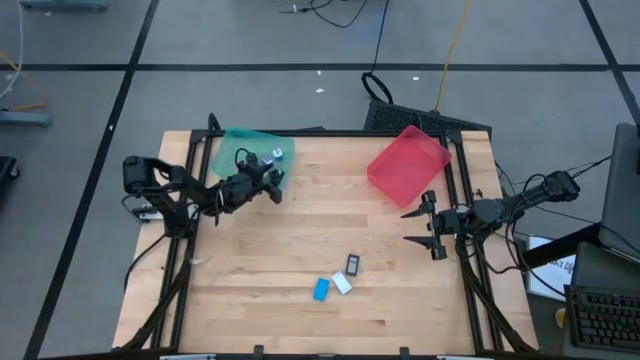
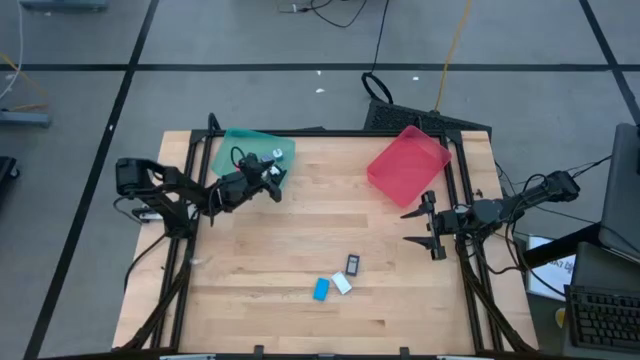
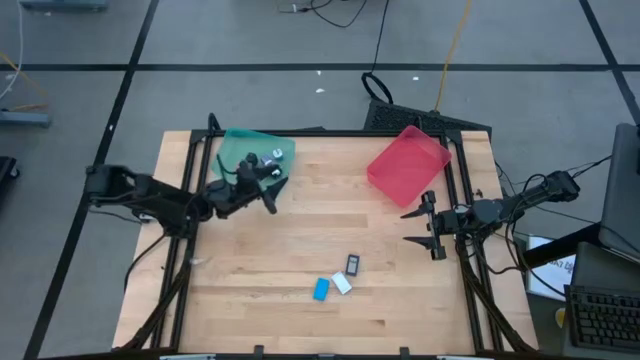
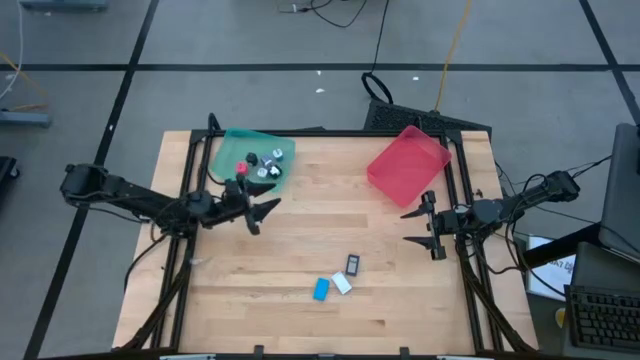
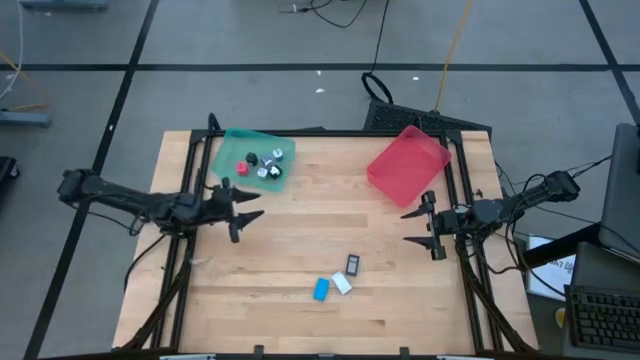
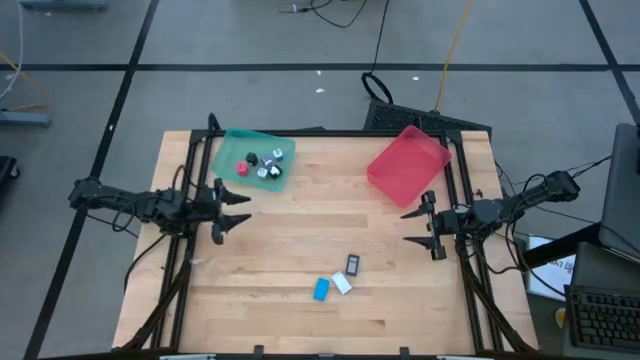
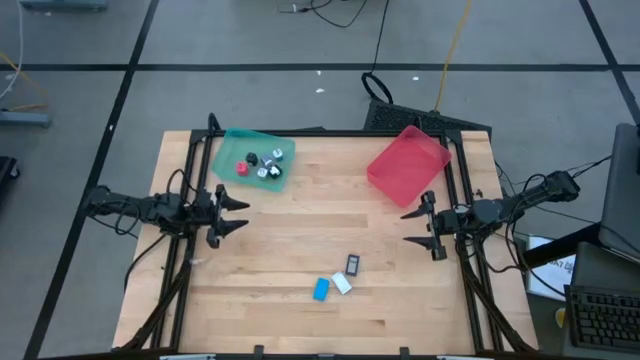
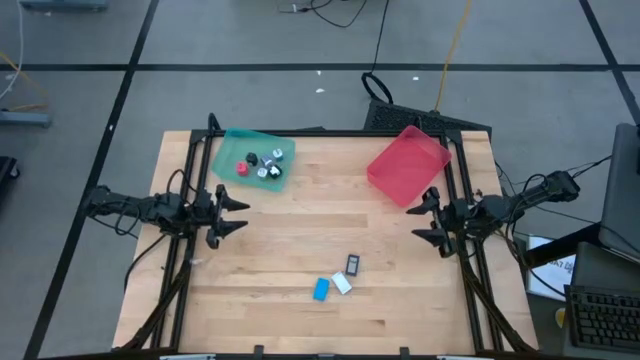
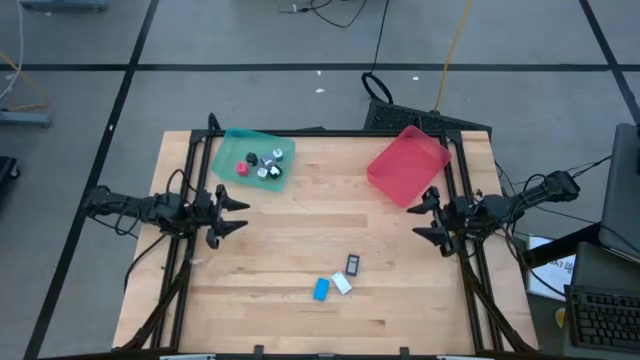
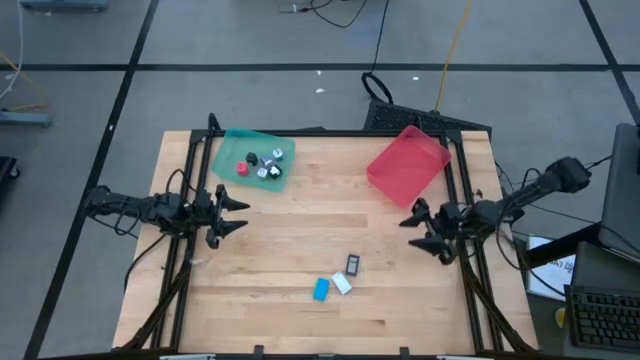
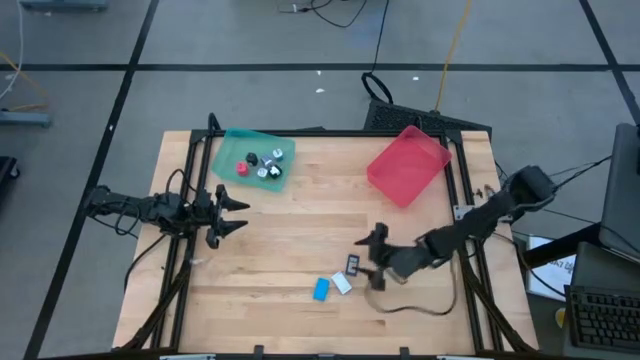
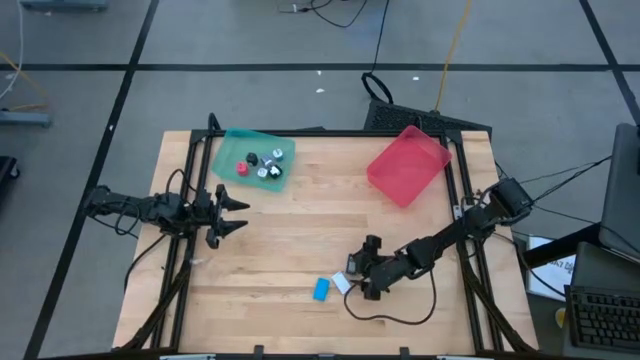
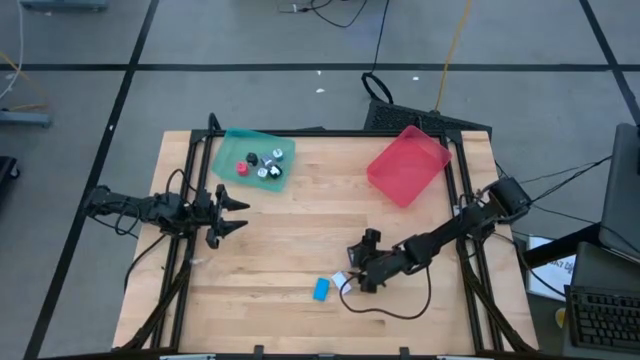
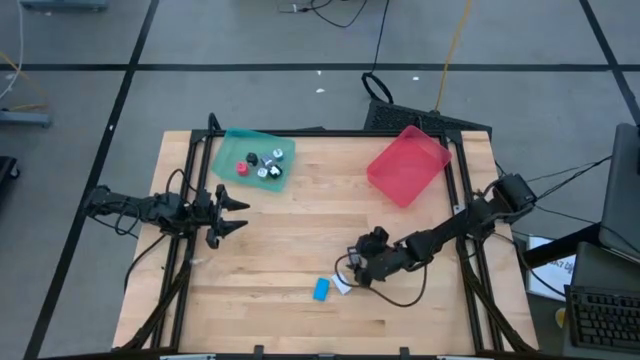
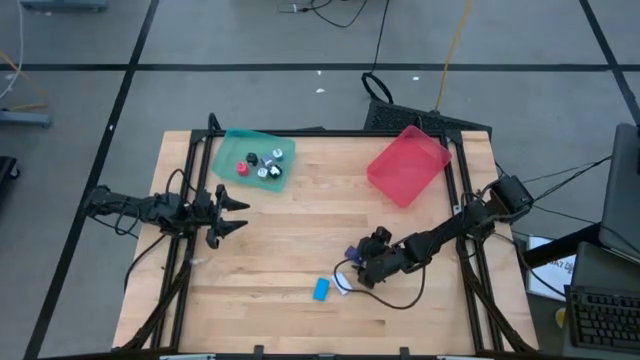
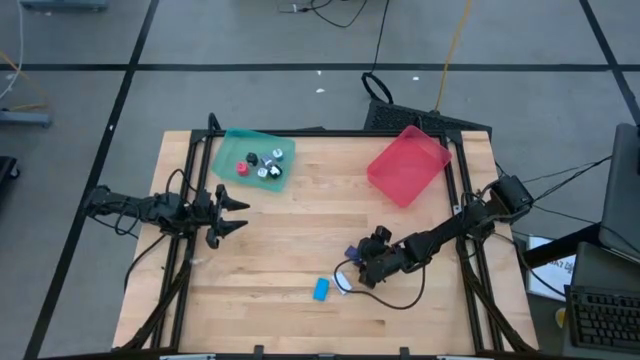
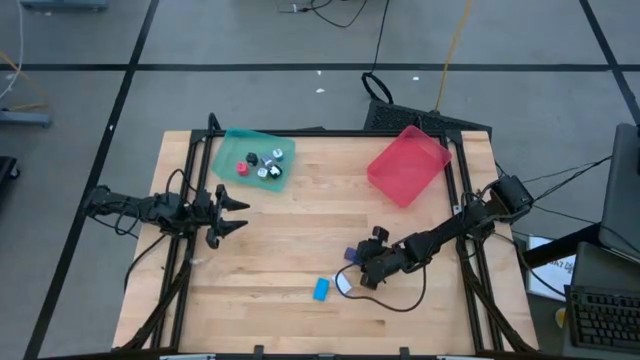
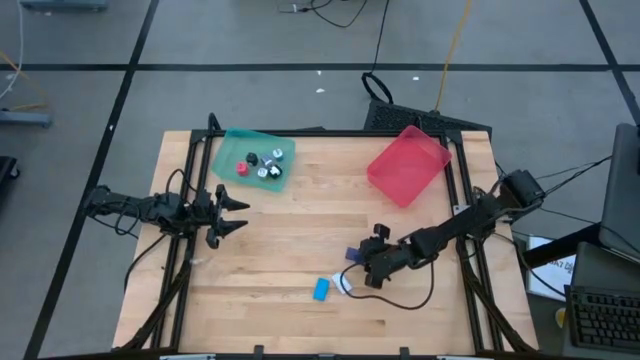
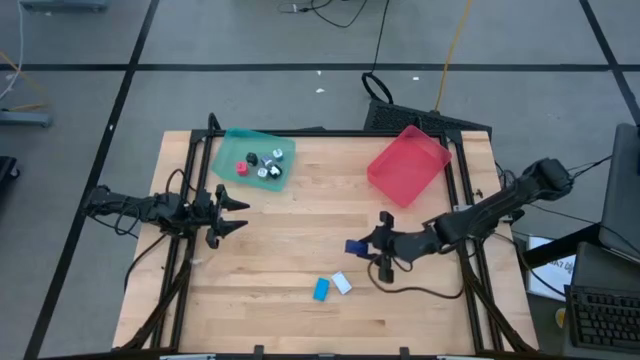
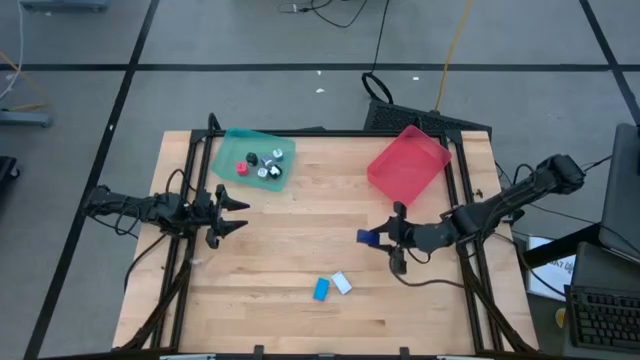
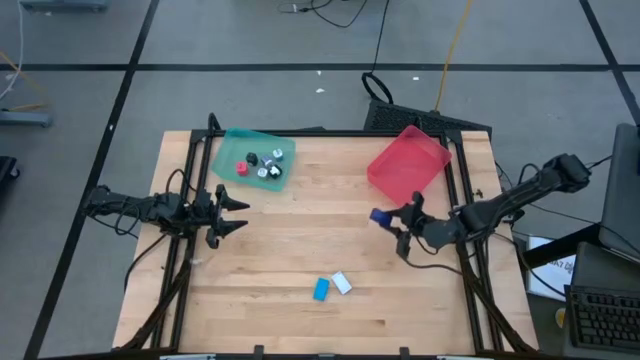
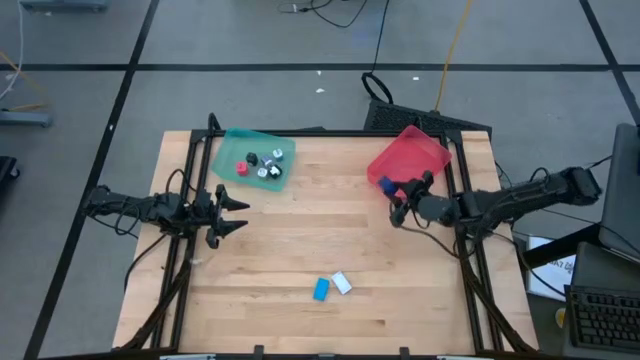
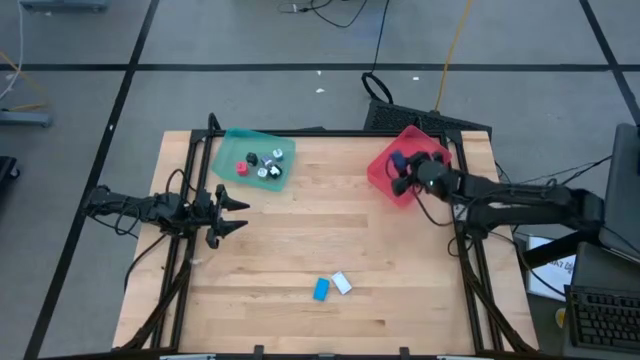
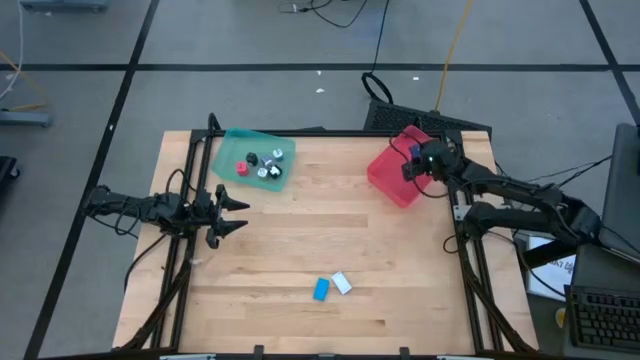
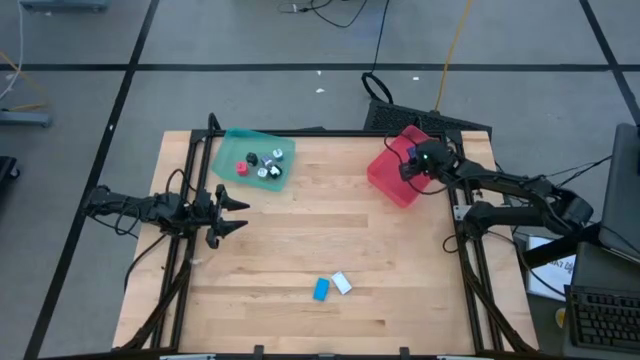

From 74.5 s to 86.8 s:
Task: Pick & Place Office items
Put the dark blue digital clock into the red bin

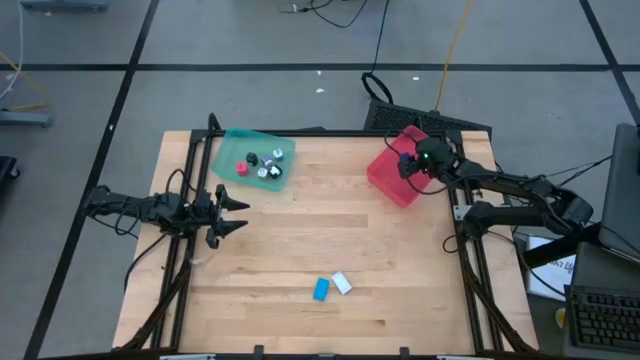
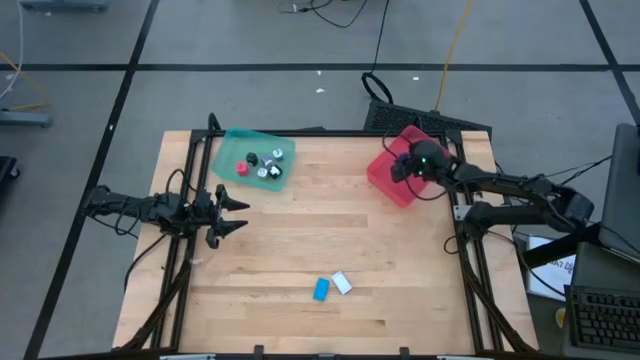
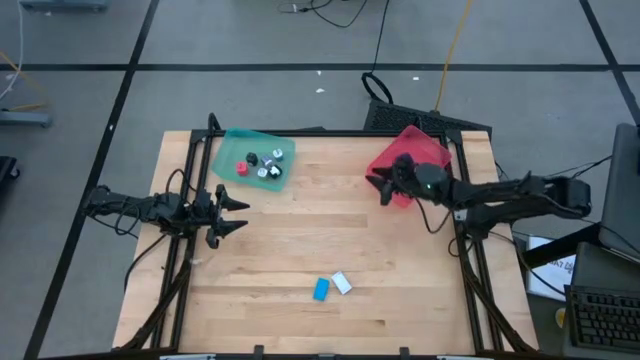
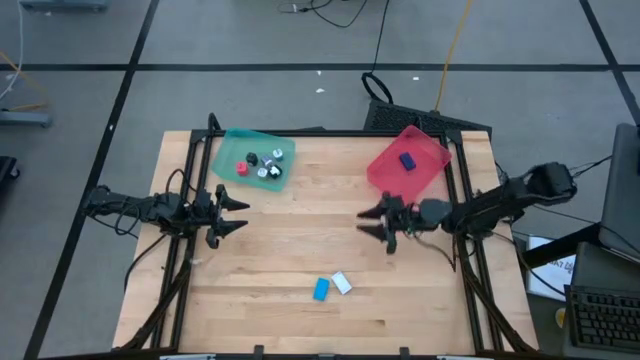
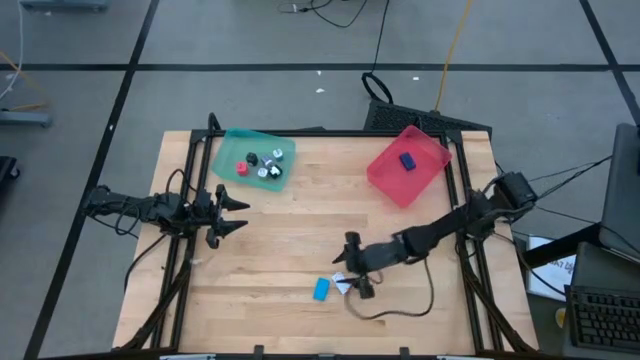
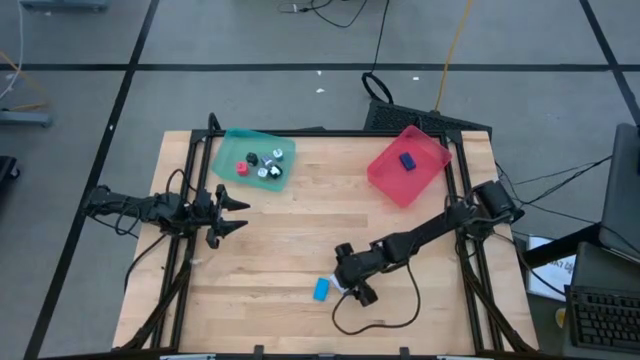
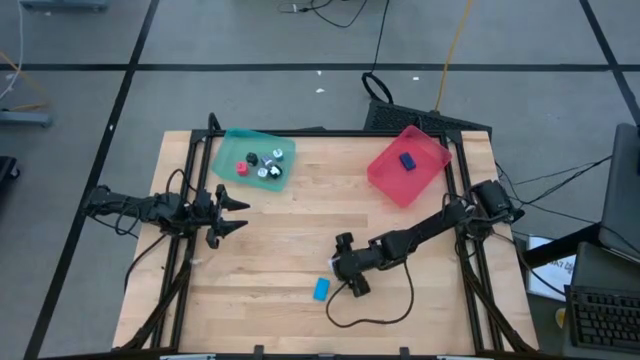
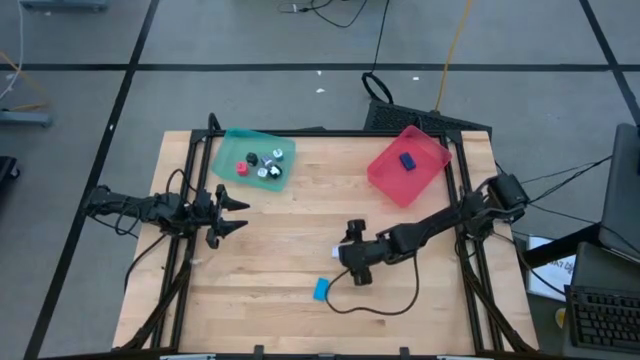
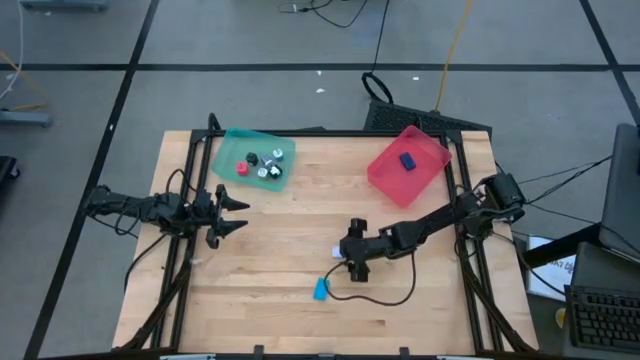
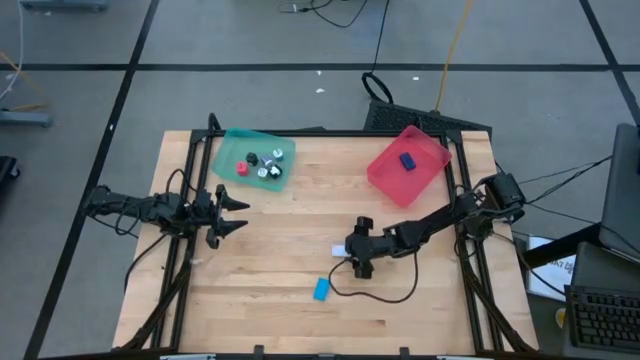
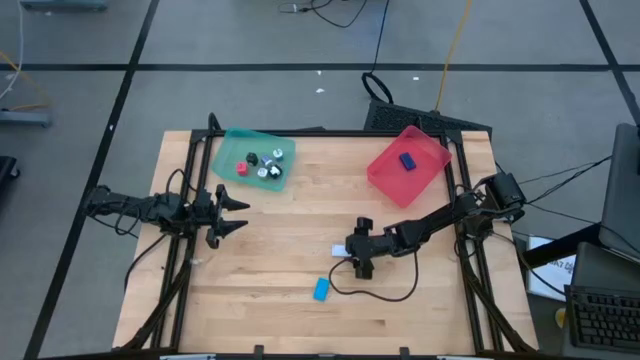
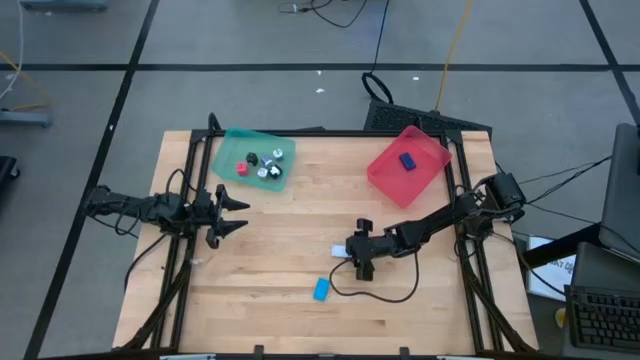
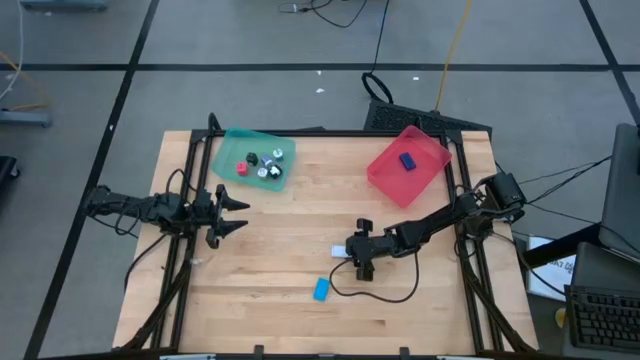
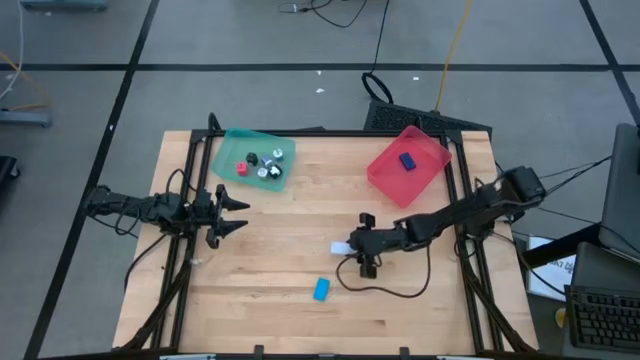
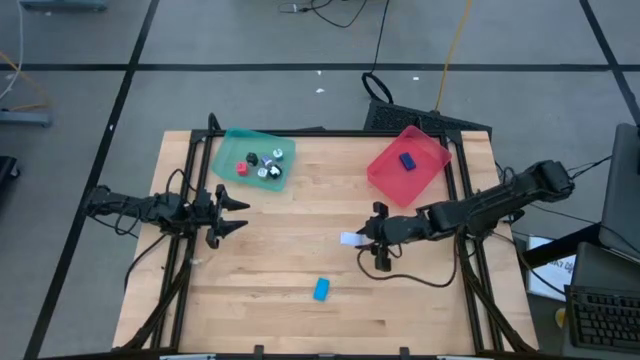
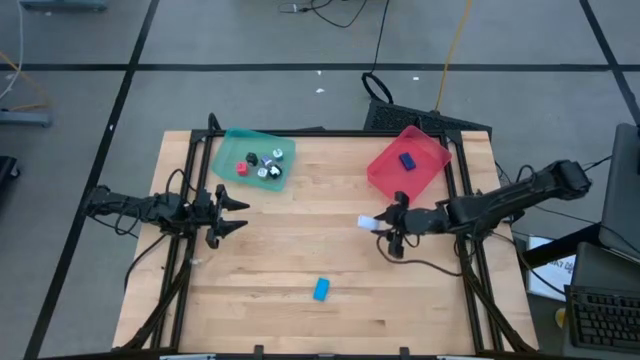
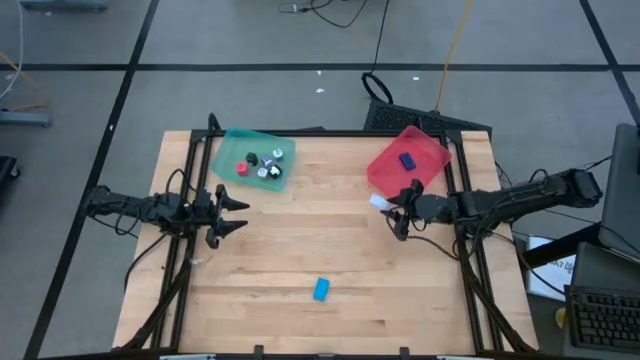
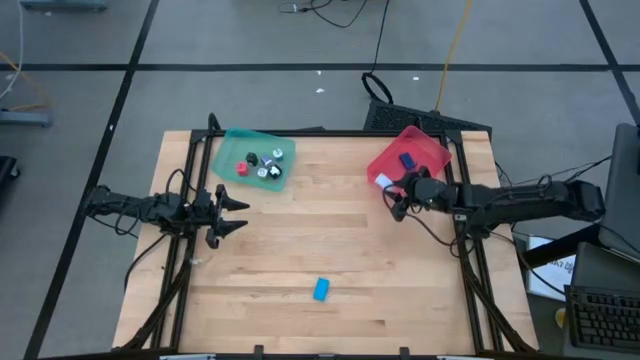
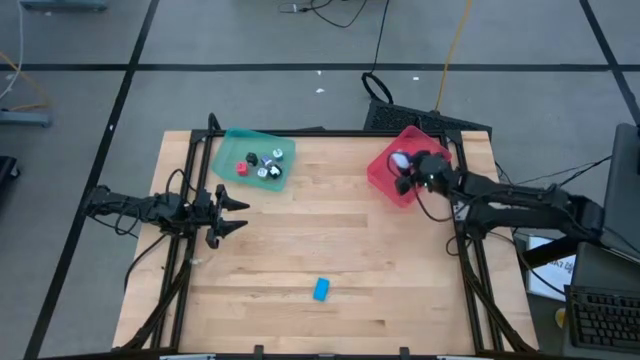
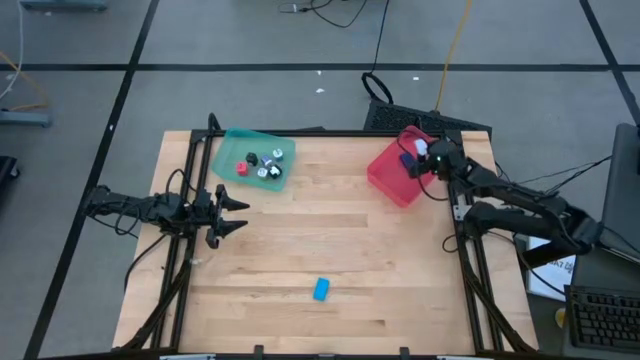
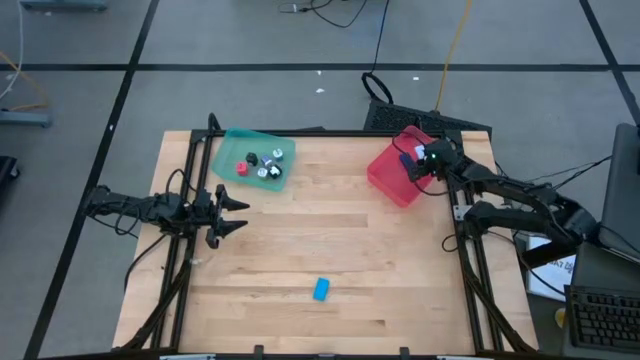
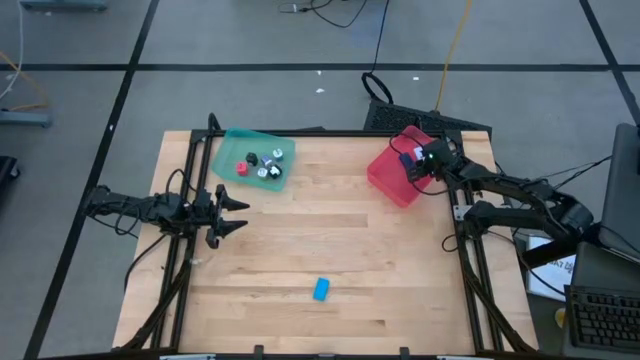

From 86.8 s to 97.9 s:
Put the white digital clock into the red bin
